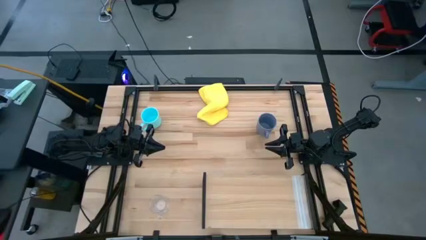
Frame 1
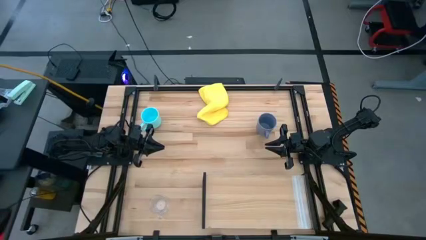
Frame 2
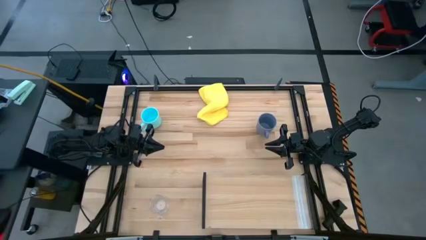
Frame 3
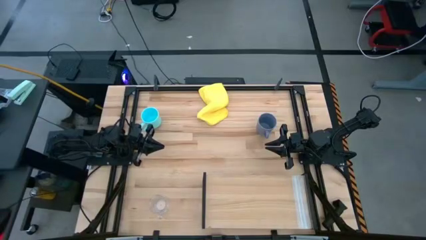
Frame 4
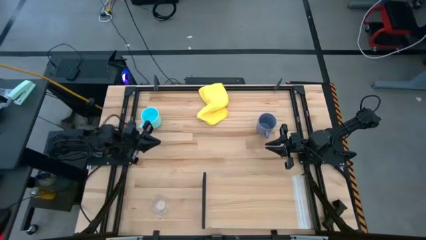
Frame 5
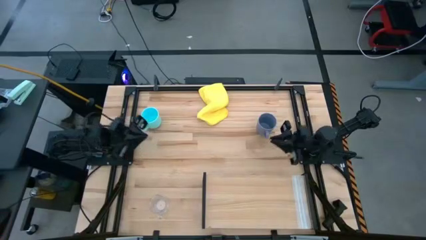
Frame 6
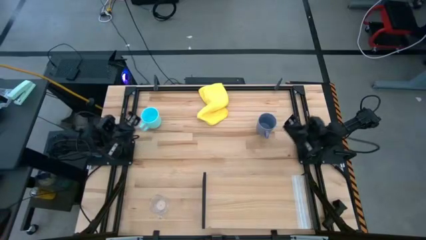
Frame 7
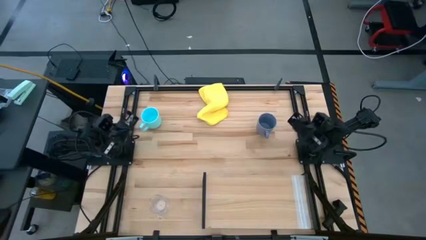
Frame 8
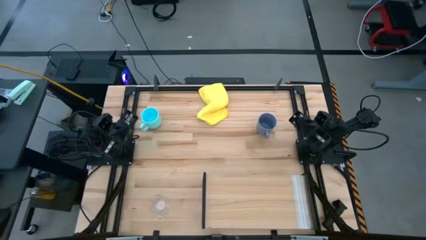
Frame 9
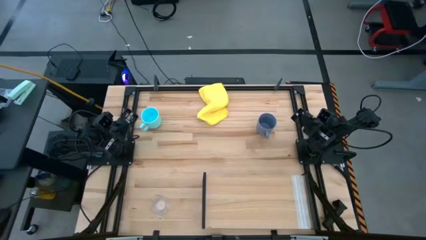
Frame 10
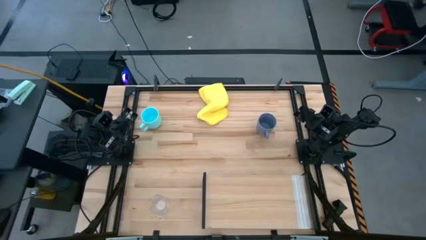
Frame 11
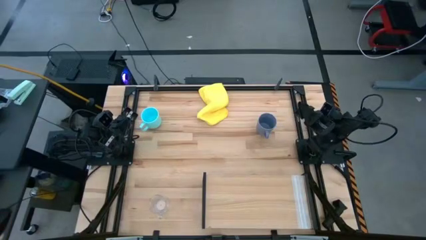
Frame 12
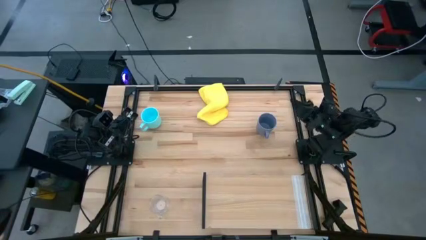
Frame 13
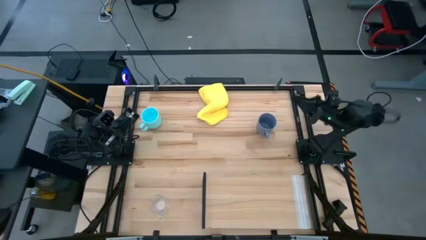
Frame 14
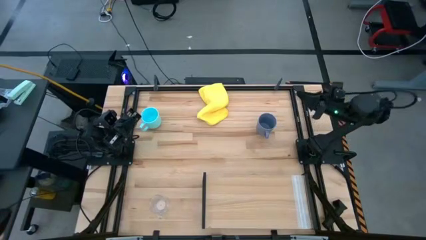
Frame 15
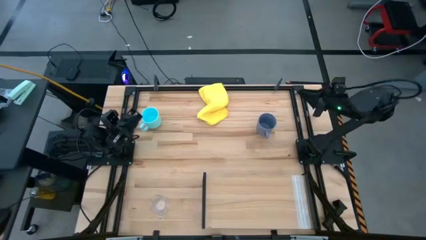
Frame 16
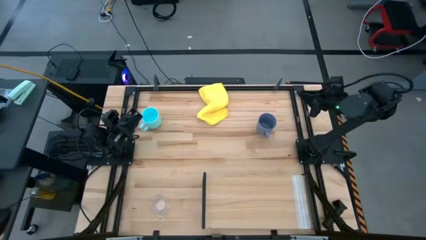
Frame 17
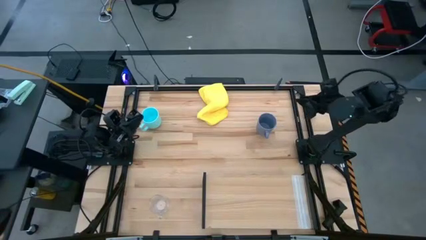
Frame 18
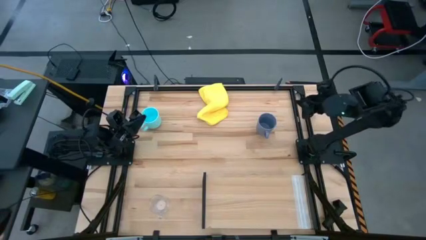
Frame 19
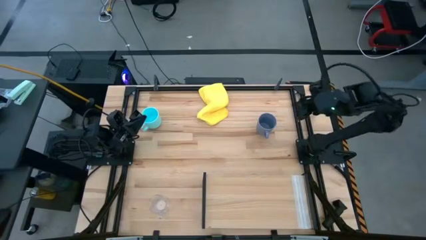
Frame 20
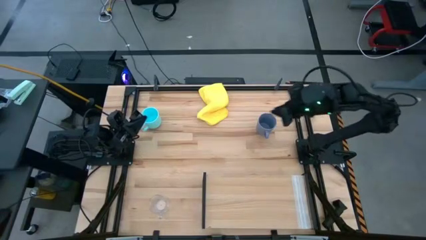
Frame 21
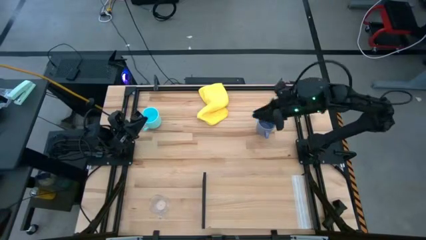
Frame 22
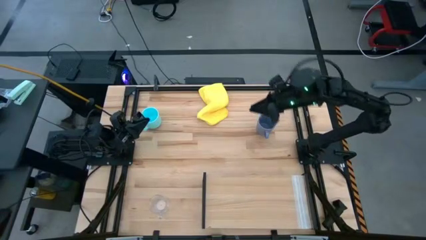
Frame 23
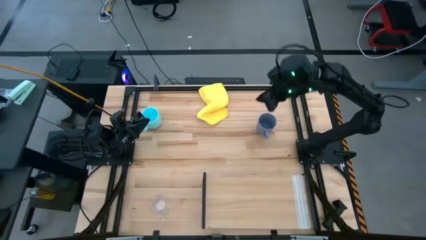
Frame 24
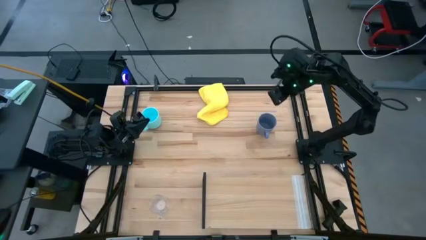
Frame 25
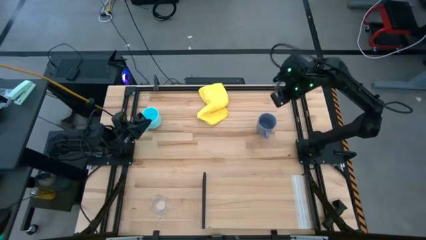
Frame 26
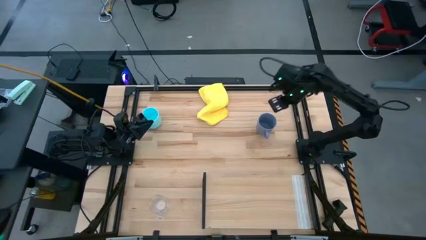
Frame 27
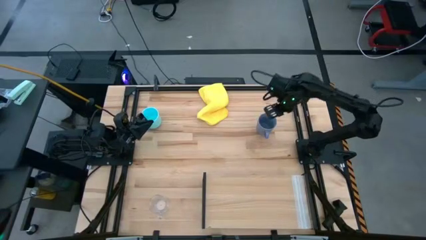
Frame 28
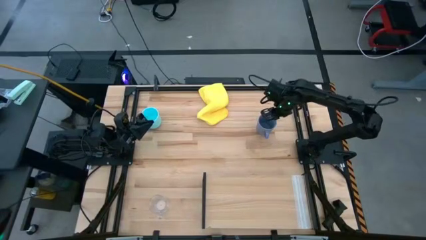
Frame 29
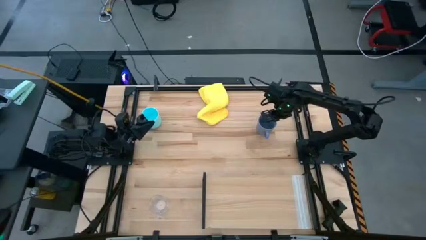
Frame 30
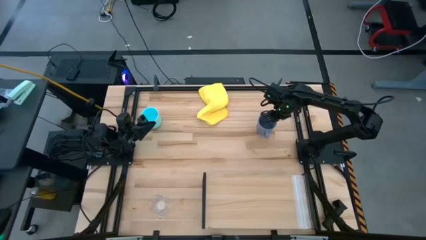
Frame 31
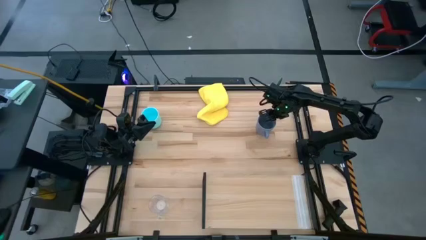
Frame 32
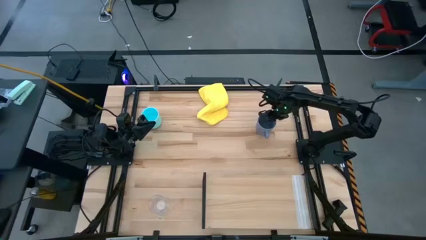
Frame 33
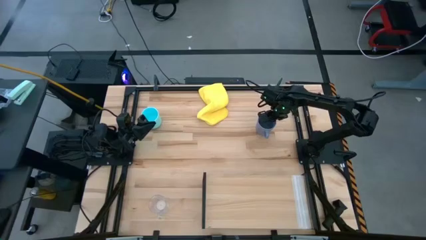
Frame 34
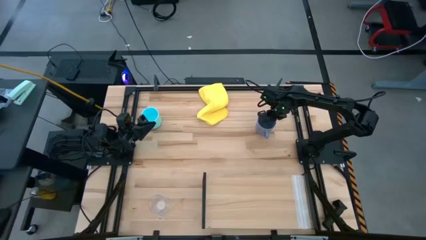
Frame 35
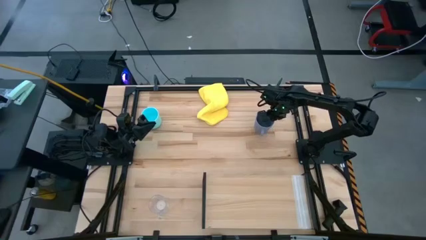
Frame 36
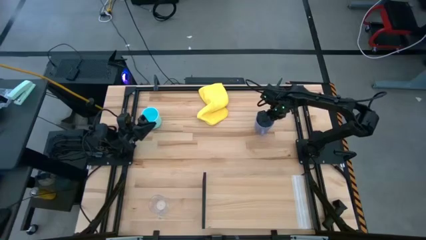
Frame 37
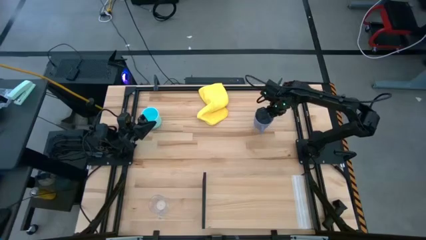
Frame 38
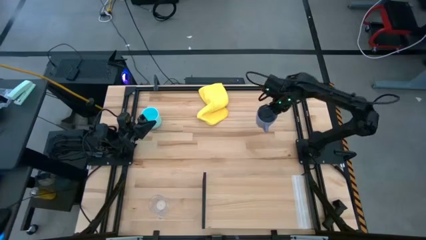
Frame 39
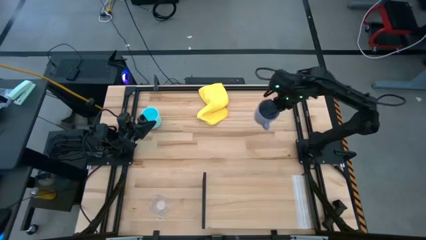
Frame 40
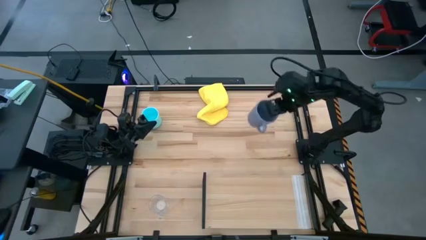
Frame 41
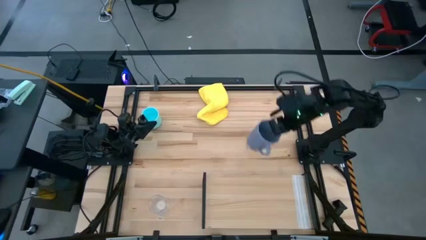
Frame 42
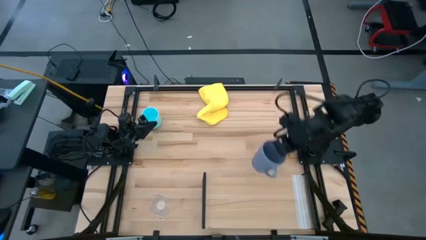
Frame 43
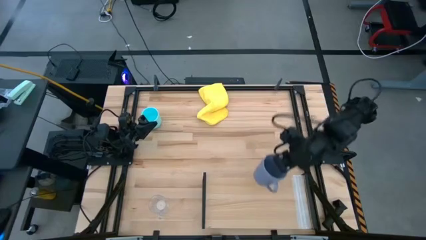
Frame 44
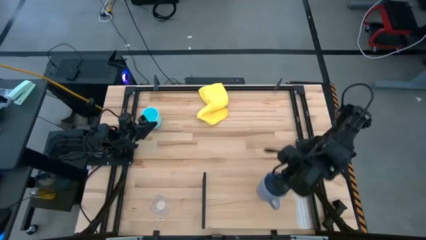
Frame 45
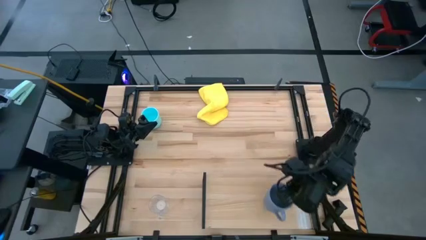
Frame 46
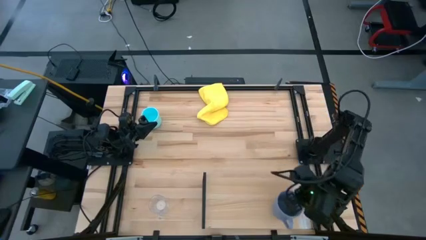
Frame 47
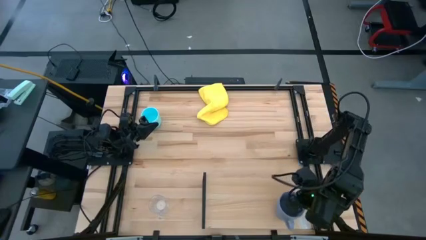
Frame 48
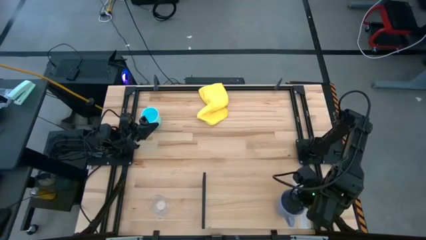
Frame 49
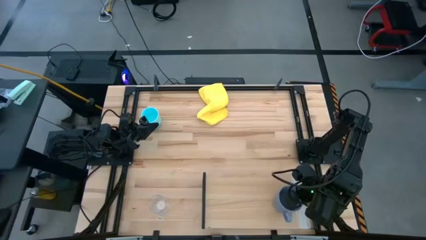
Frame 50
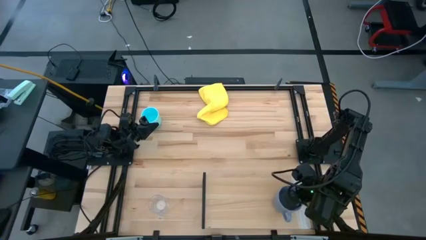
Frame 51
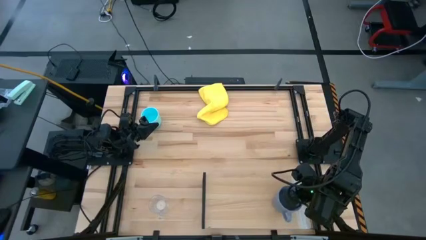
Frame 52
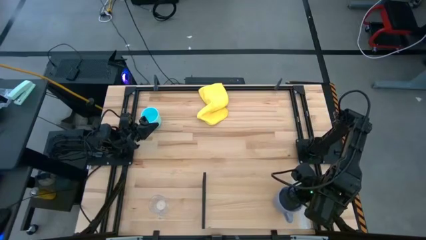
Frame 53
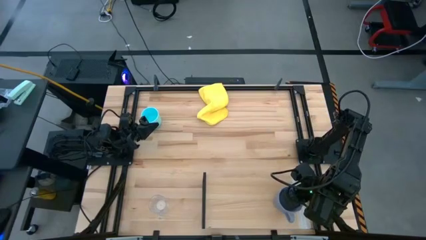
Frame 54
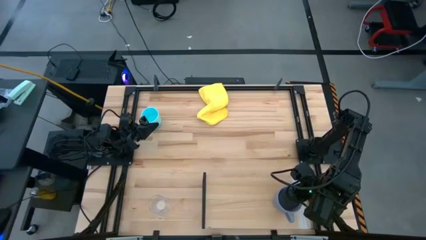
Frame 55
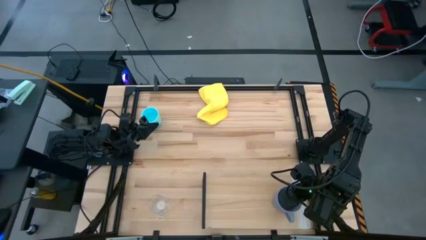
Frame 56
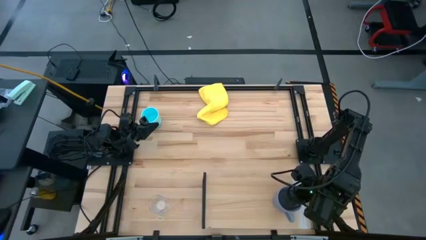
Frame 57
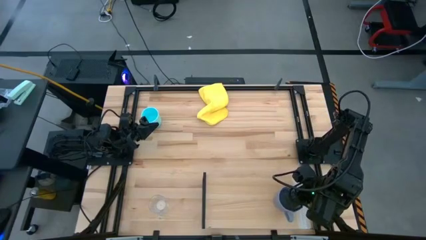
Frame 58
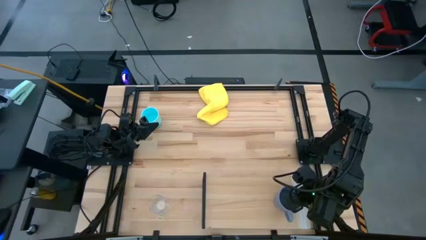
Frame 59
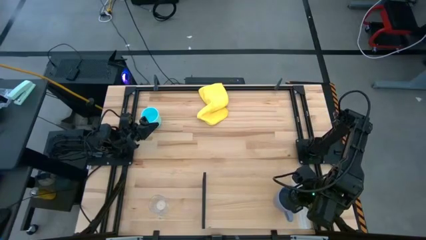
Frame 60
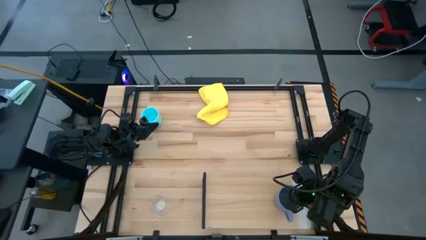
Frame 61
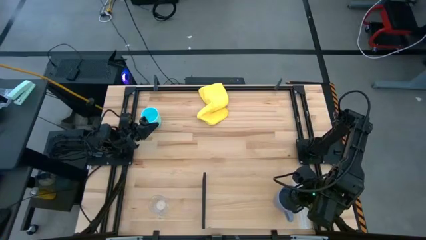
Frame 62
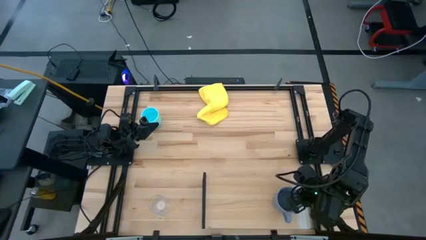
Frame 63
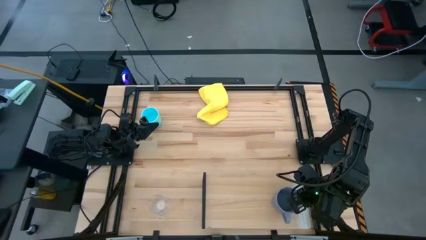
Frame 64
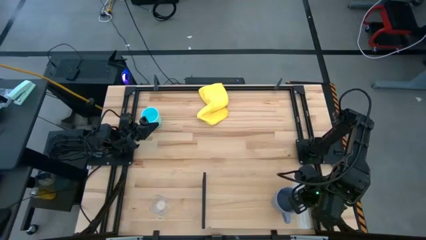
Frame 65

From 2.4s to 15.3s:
Task: Stack small to large cups/mugs on shelf
Put the purple mug on the shelf
